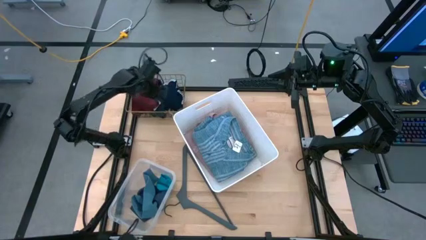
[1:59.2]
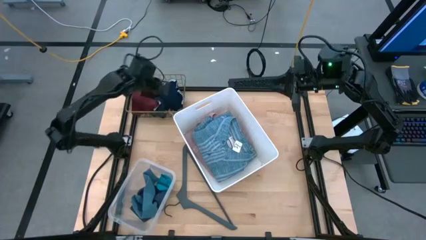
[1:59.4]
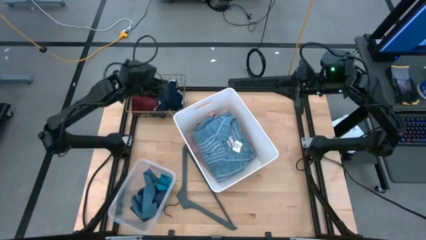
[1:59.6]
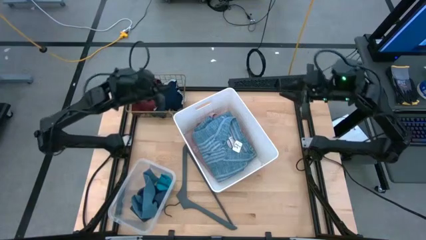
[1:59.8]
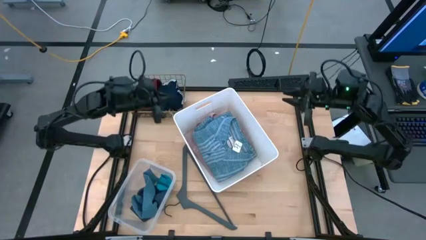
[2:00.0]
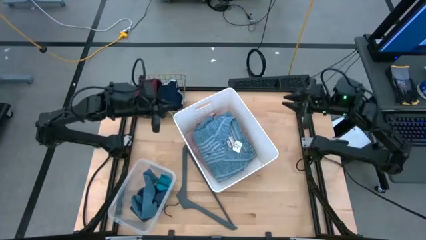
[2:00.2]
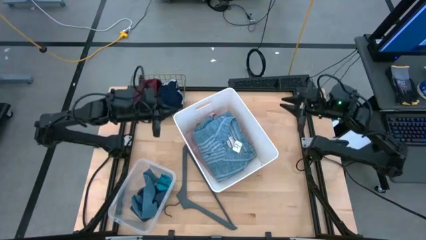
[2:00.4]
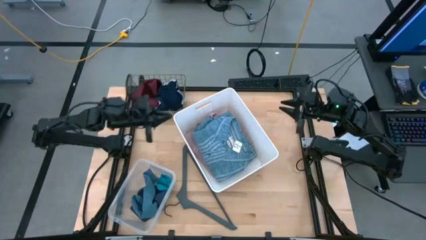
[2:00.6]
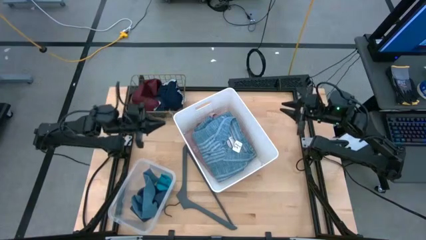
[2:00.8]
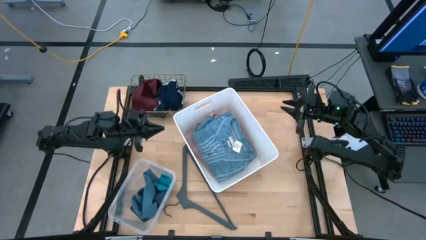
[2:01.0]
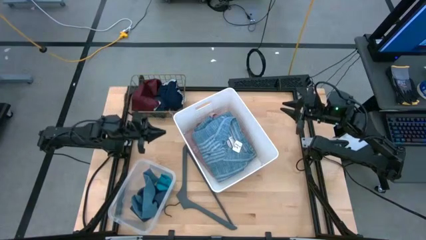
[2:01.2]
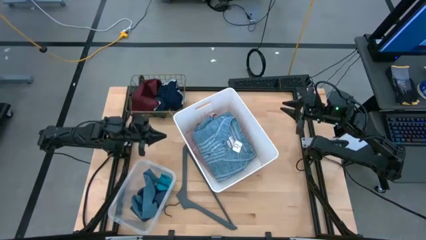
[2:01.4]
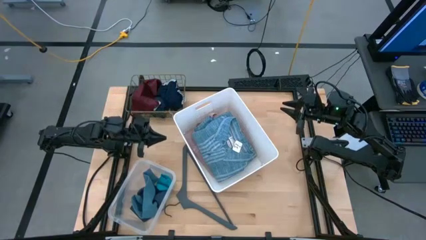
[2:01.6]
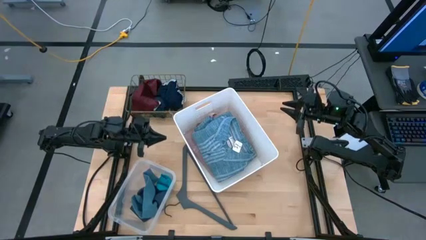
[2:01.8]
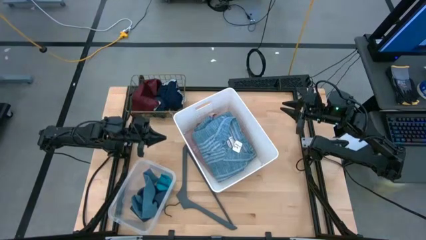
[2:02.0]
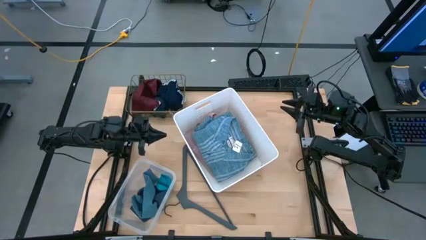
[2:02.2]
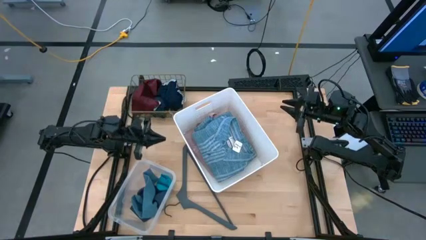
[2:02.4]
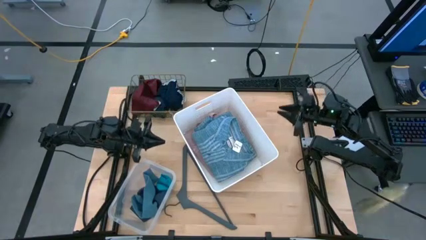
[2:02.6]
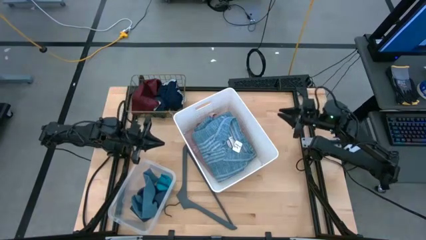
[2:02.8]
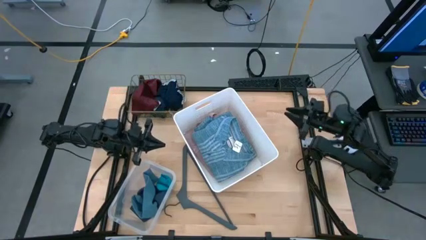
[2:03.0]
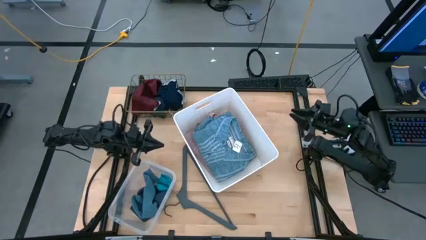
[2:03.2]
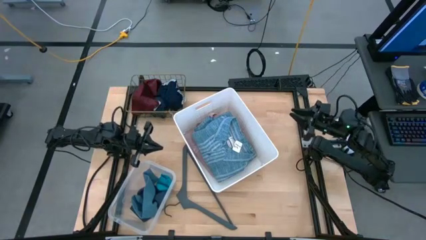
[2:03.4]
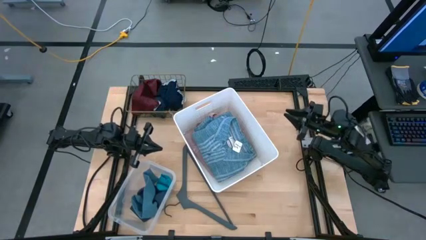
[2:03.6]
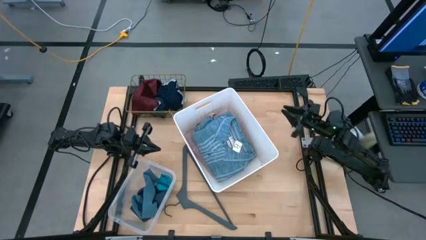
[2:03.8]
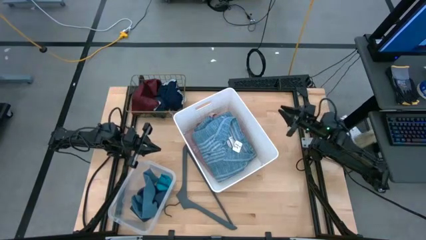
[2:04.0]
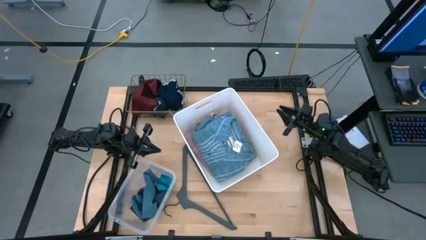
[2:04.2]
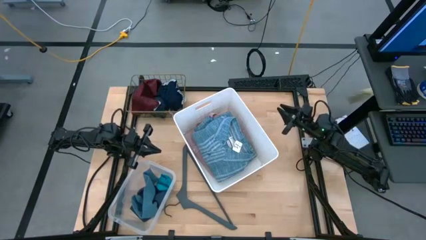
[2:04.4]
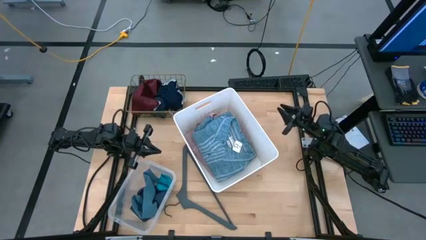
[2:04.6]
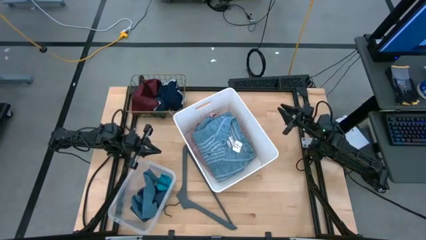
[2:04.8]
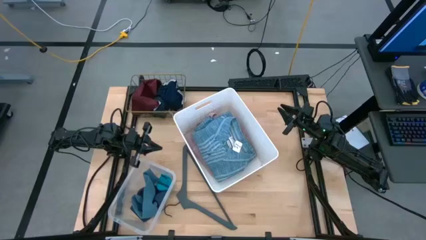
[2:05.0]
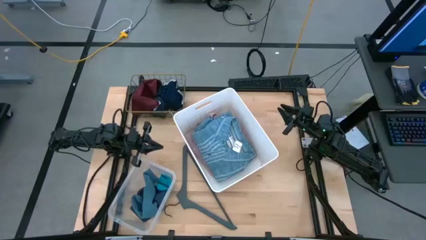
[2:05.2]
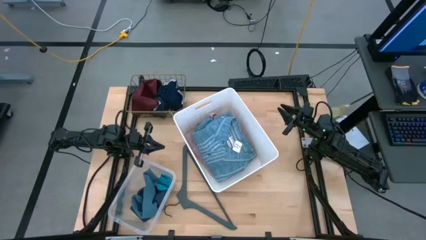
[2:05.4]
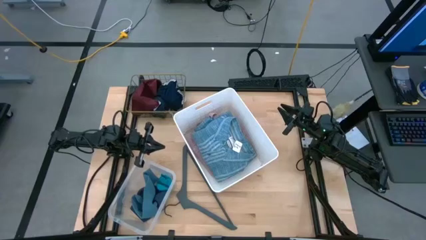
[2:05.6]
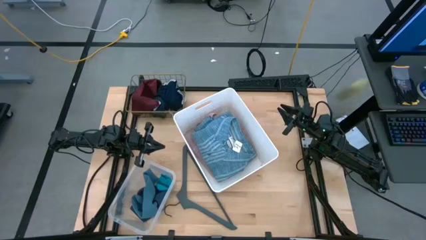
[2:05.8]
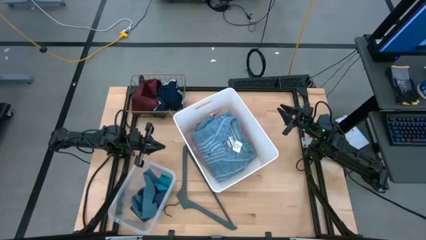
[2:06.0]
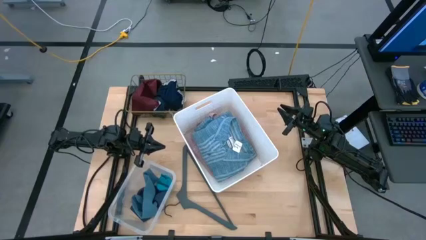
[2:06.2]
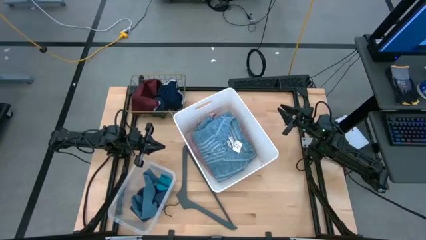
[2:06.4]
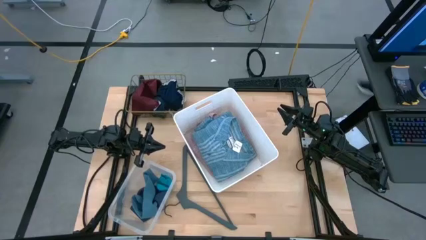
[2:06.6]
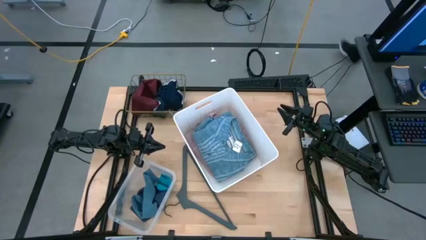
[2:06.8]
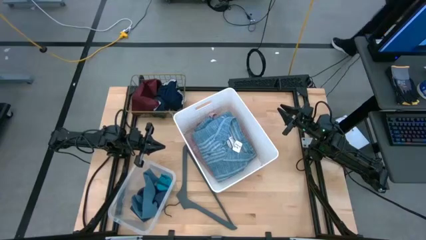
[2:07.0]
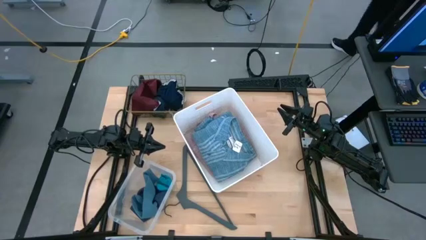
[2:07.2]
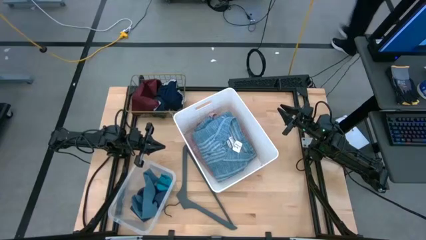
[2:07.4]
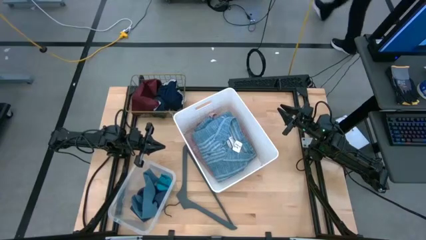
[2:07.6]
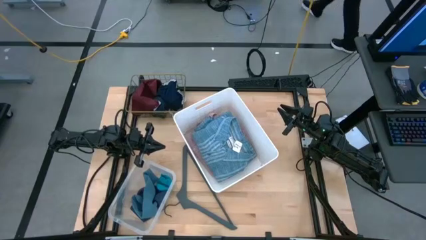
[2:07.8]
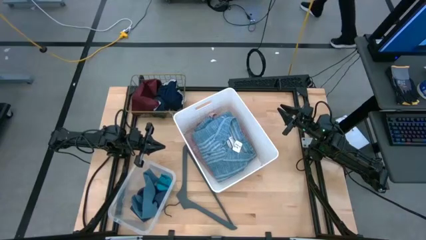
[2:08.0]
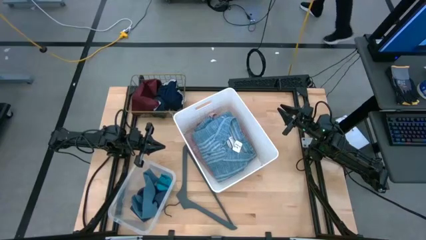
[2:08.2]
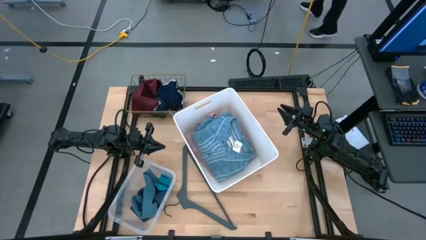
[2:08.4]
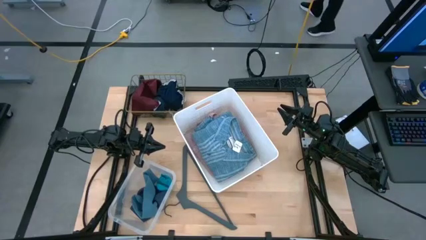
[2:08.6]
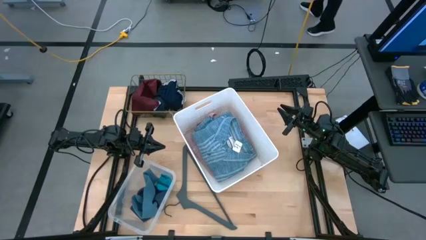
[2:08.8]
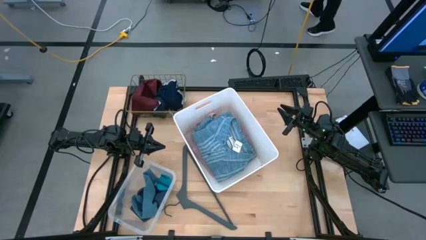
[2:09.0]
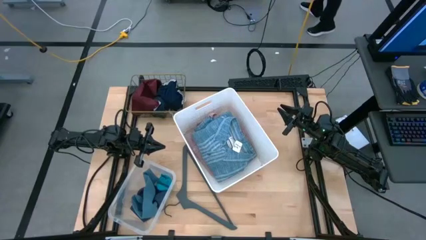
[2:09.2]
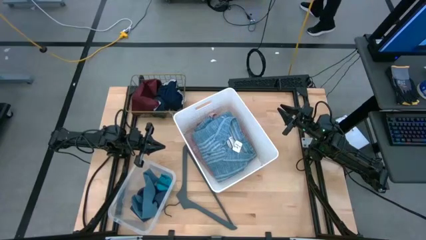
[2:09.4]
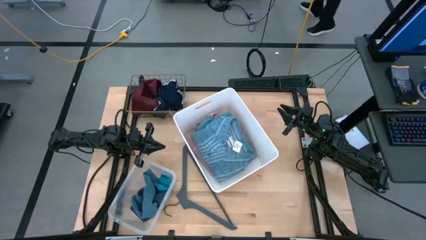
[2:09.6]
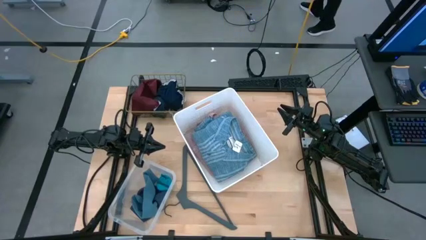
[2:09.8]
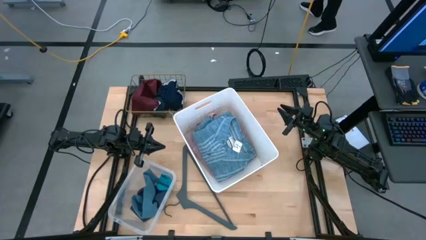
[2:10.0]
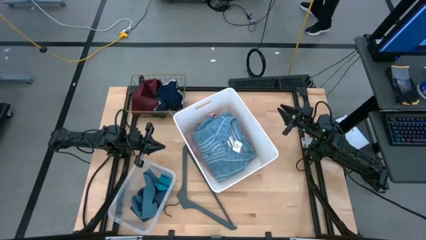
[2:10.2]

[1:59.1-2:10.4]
Task: Pick & Place Cloths
Return to Home Position
